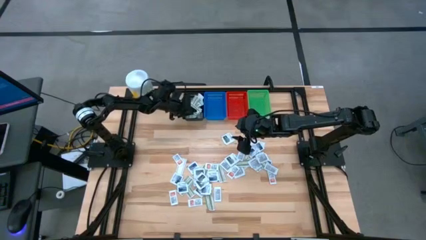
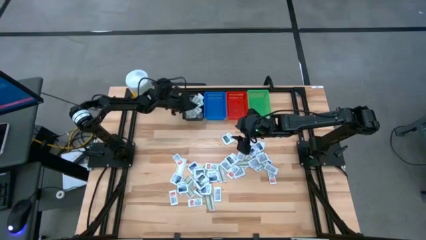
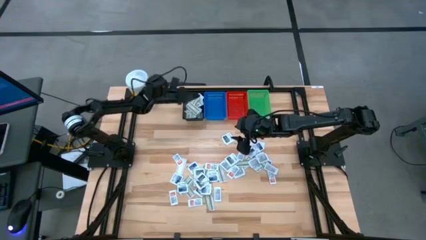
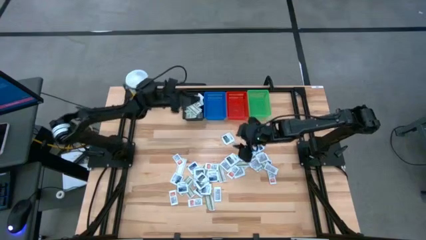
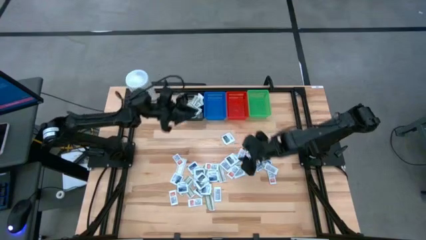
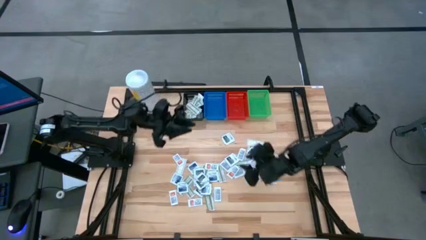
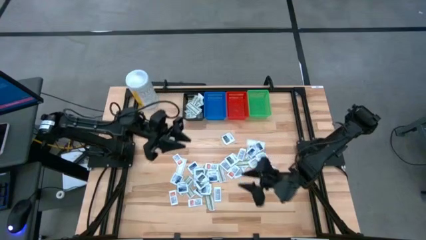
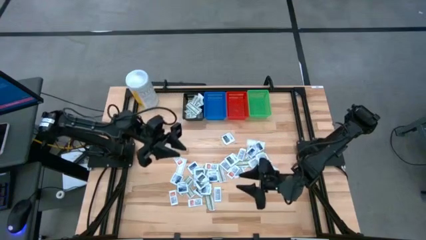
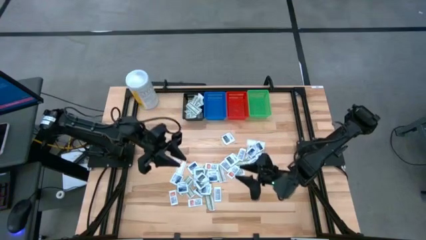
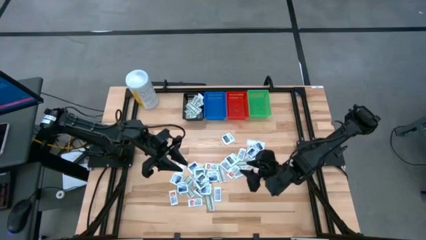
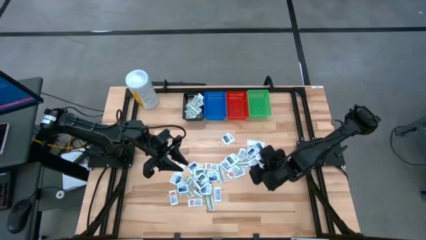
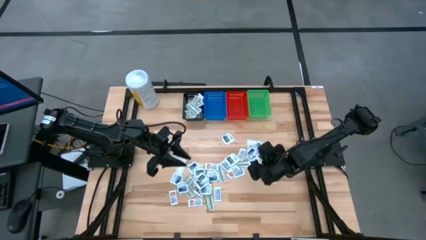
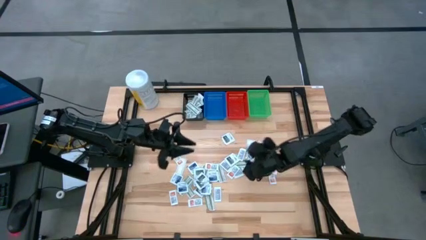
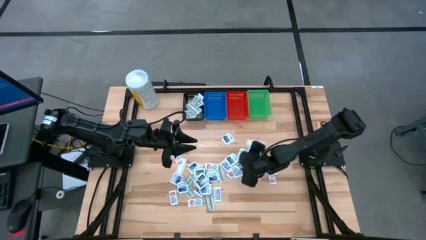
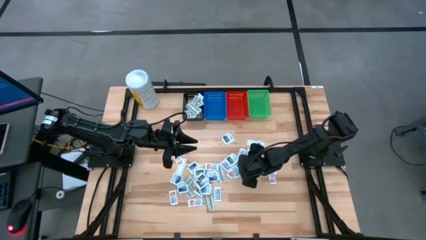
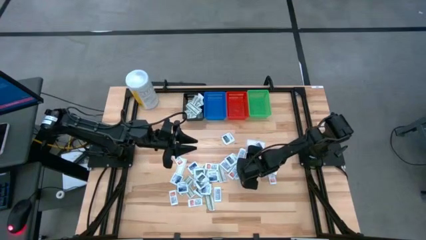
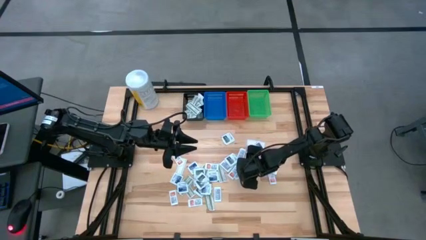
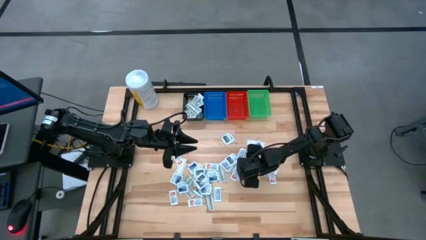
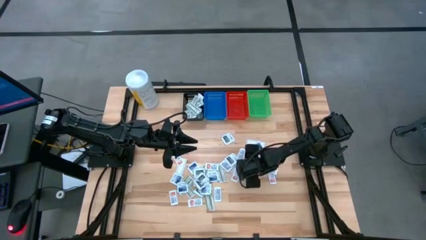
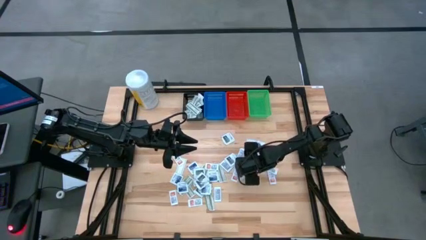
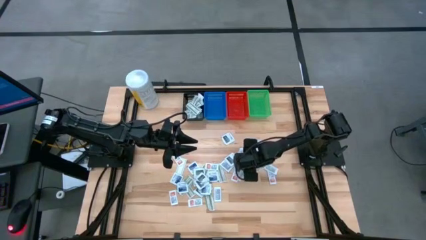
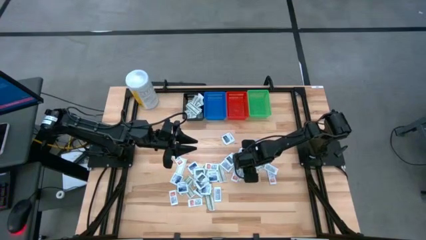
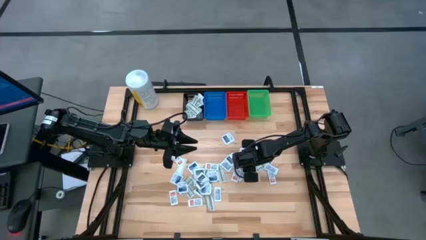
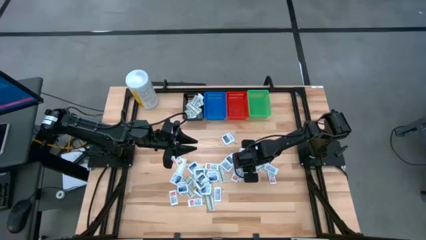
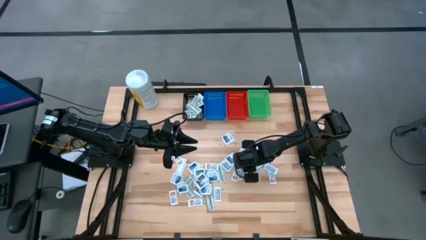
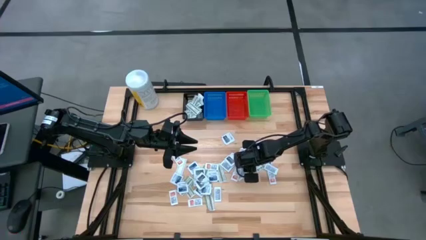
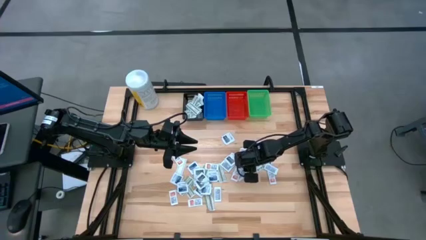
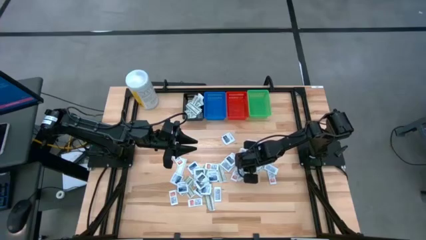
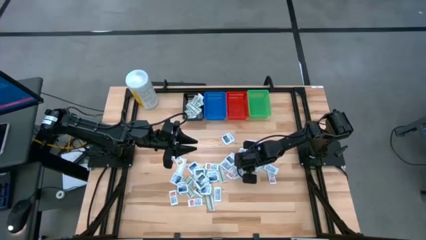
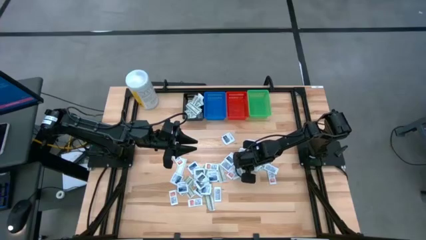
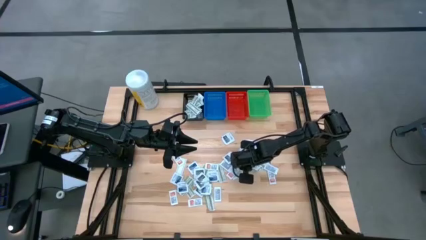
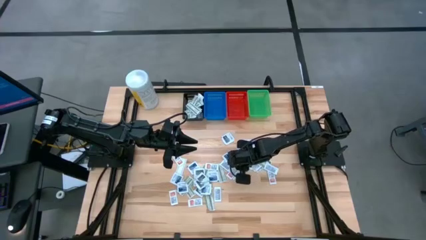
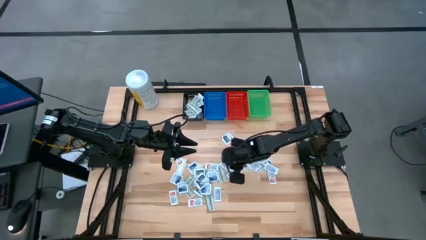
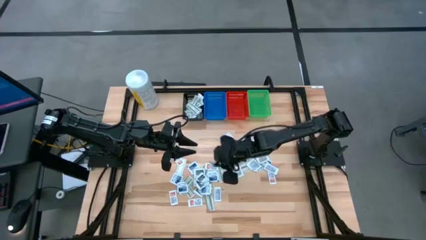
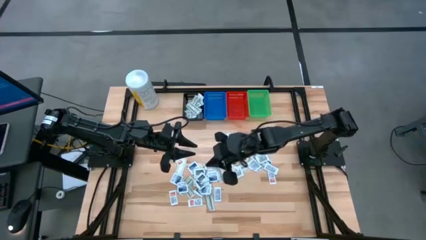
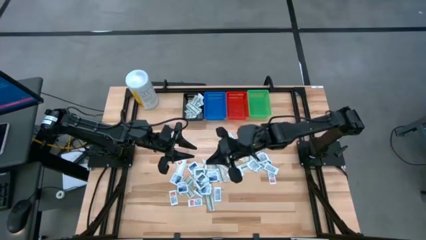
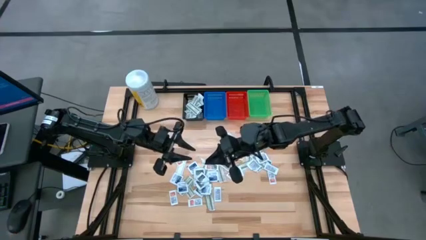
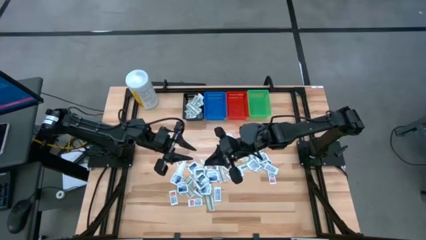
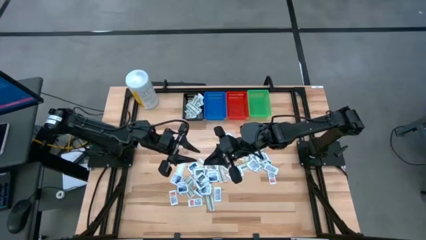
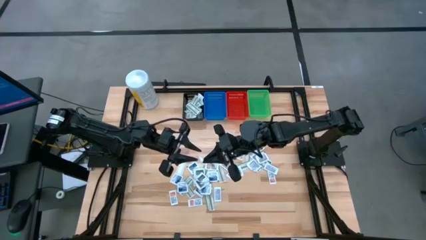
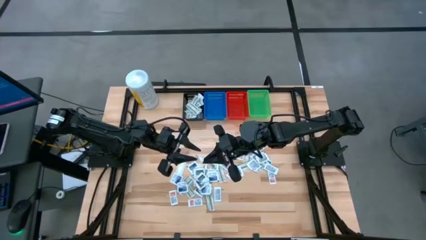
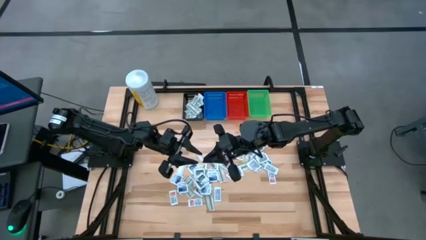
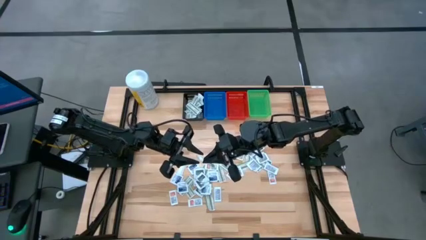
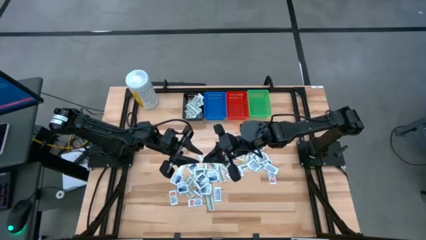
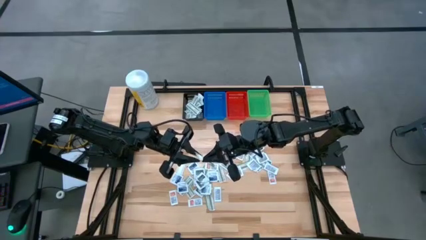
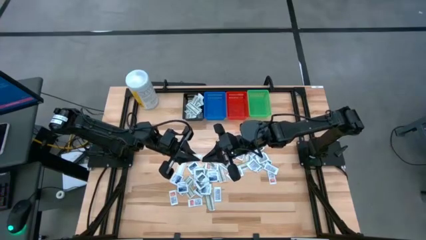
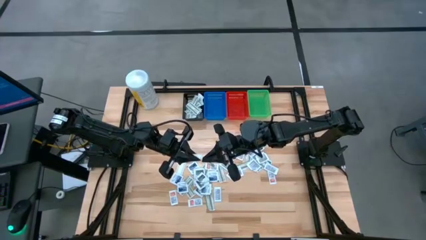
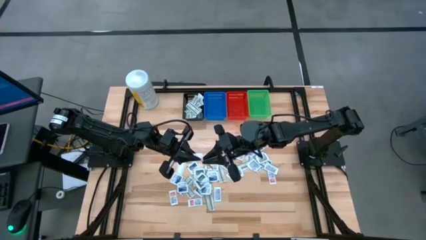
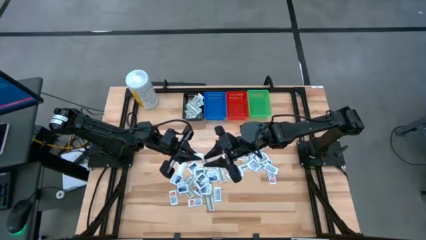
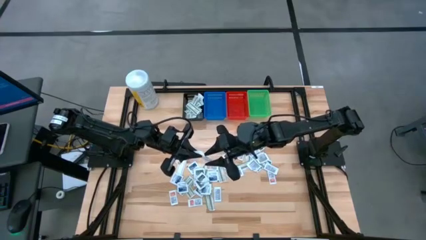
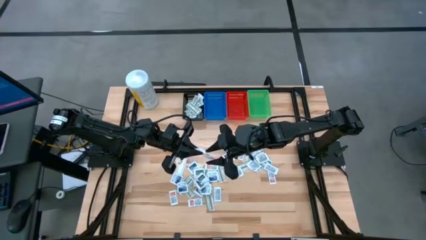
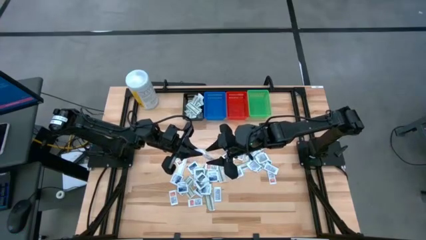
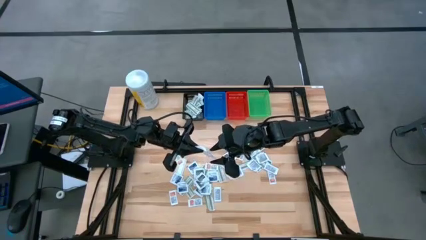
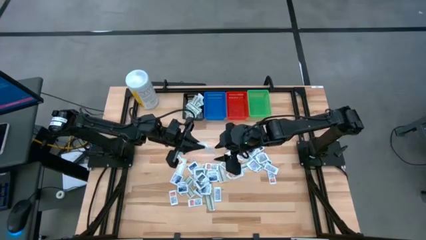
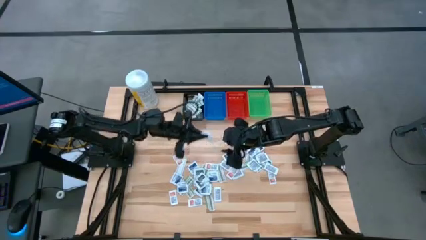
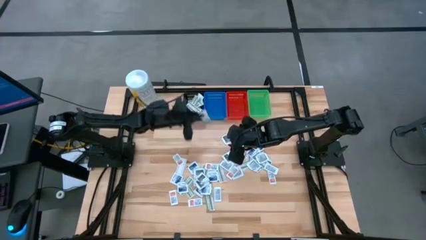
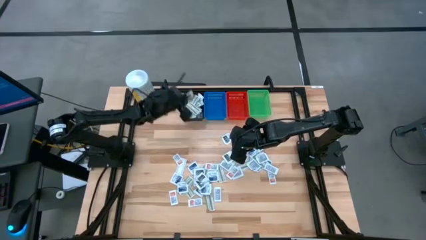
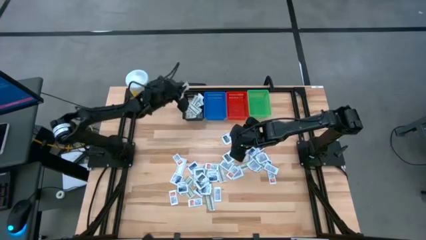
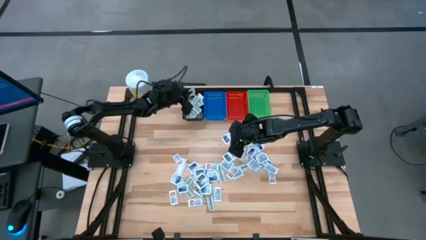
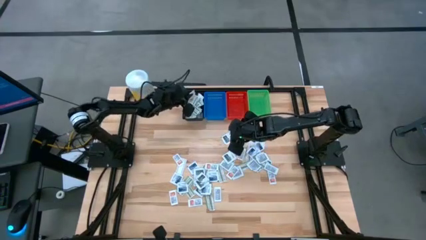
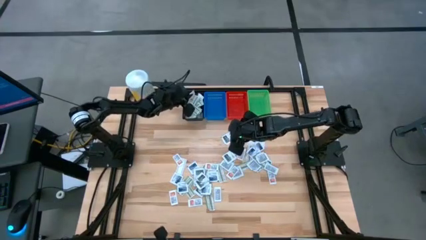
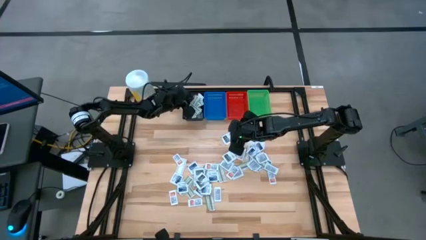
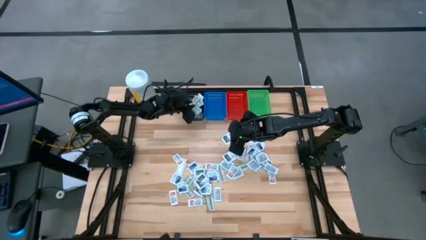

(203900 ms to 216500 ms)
Task: Pick & Place First Aid Supplies
Put the green bandage pack in the black bin

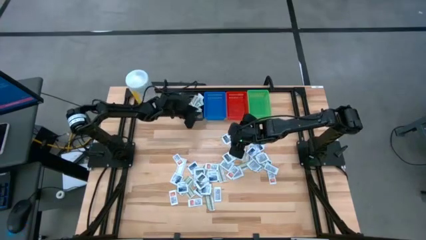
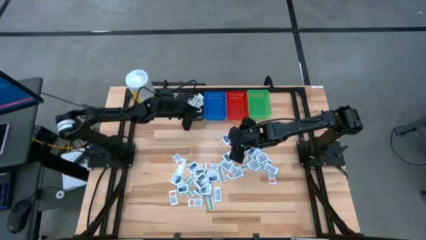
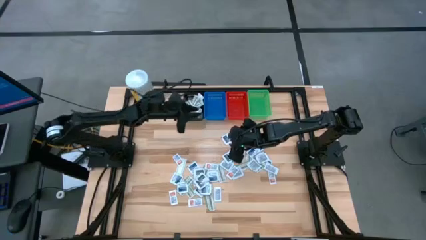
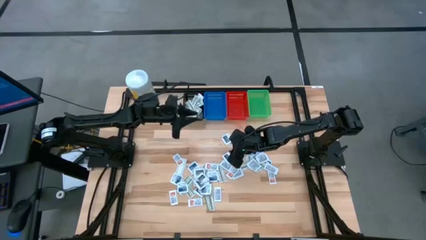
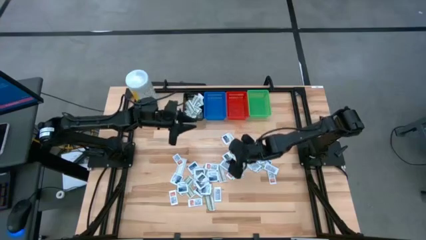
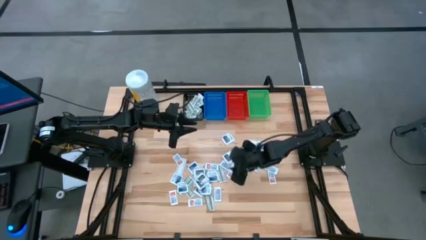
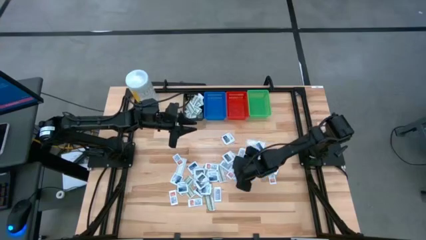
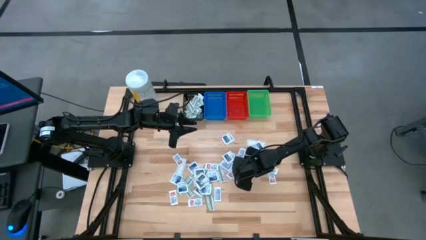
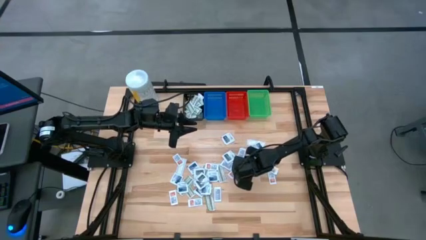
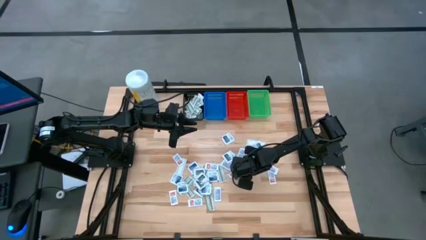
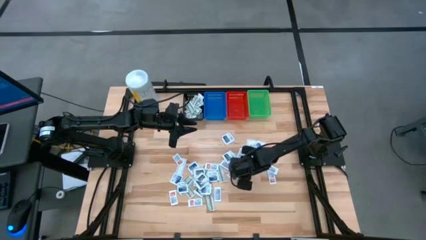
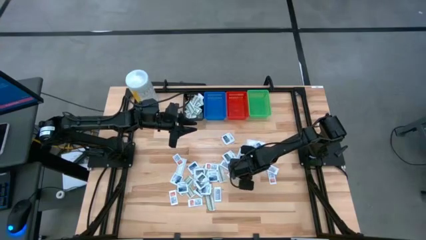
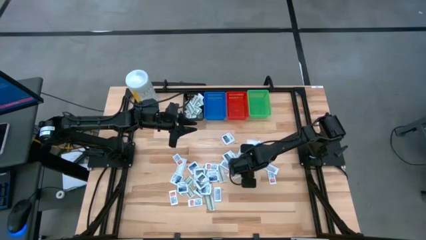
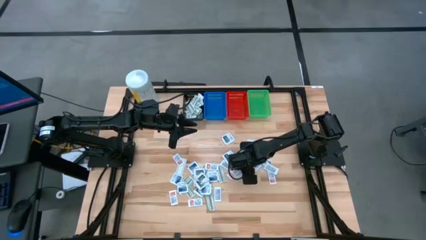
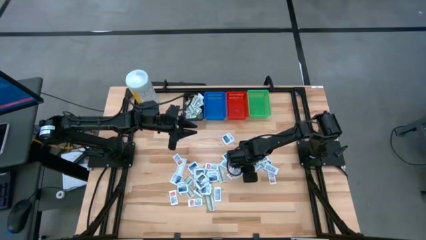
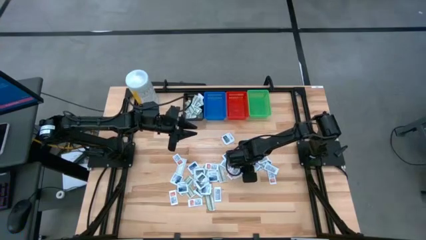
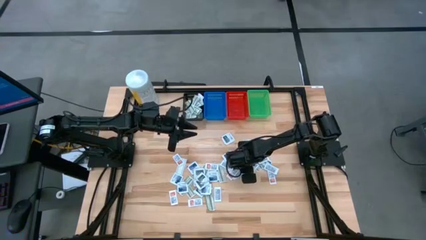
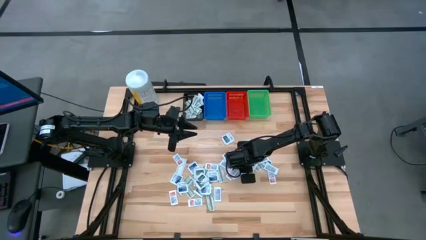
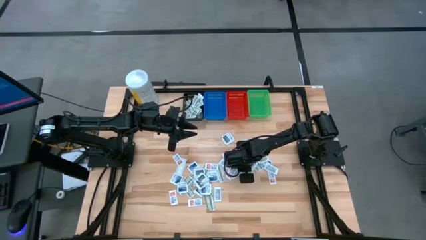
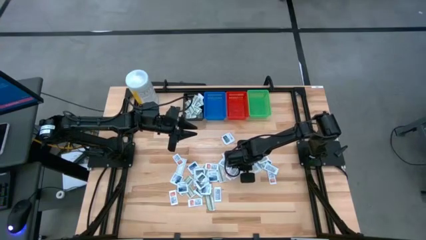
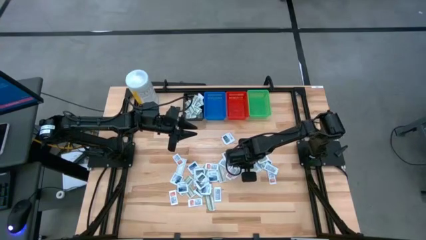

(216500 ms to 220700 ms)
Put the green bandage pack in the black bin
